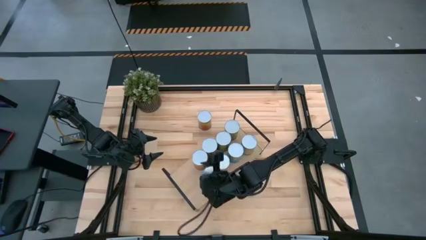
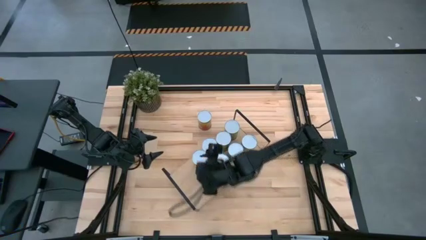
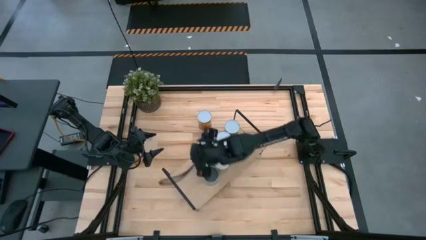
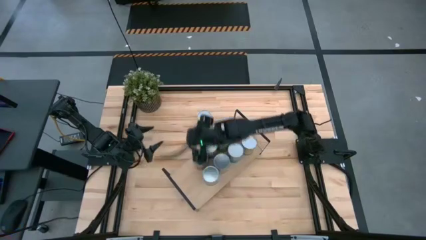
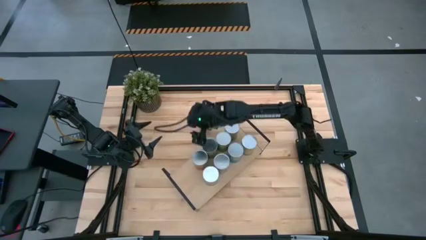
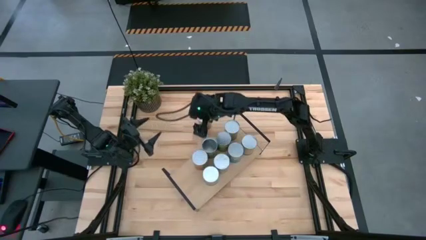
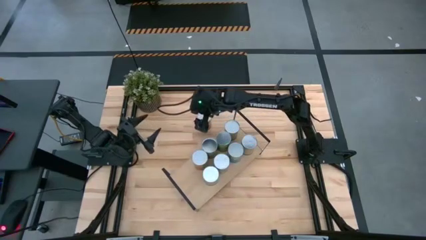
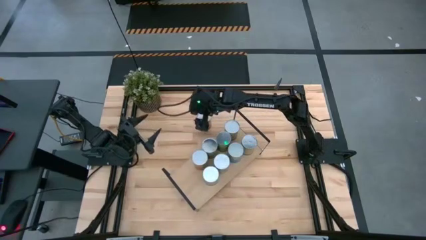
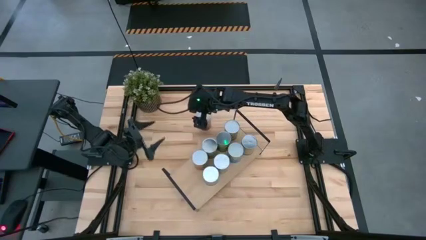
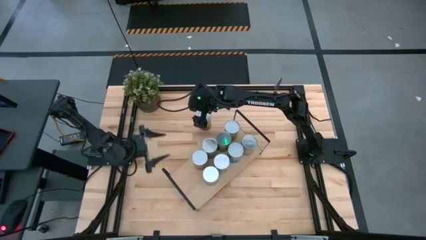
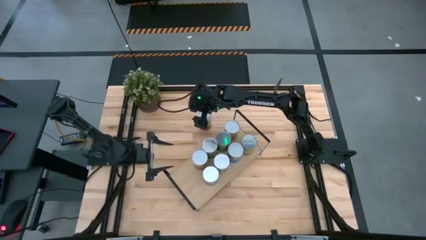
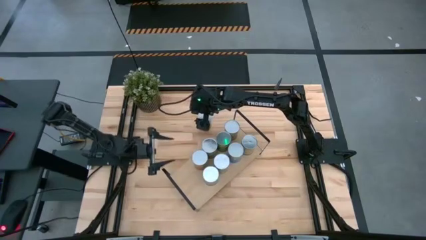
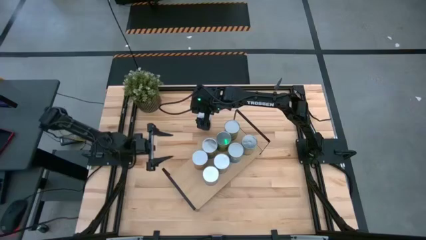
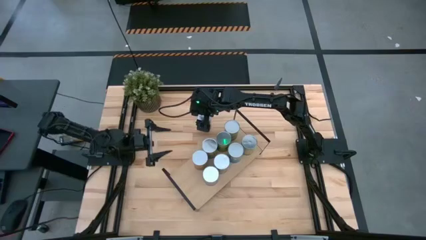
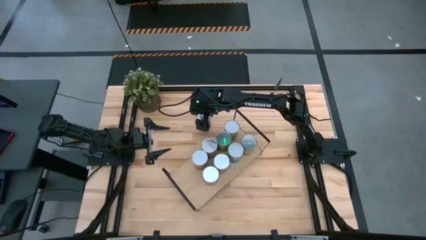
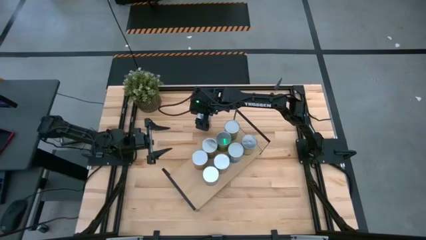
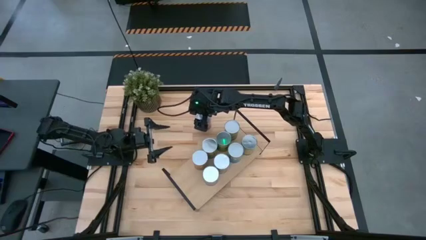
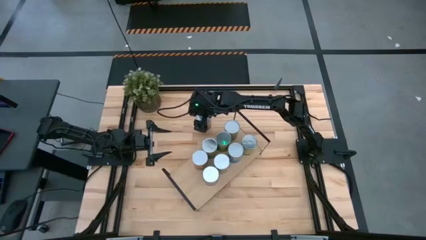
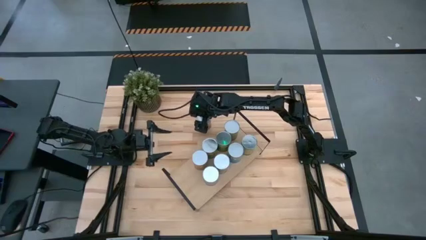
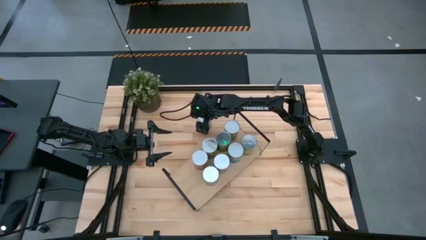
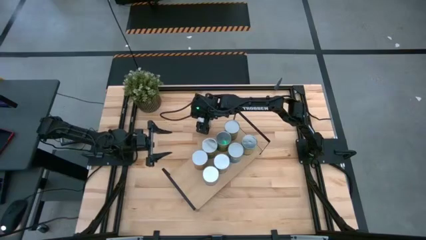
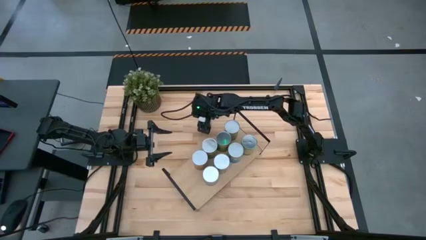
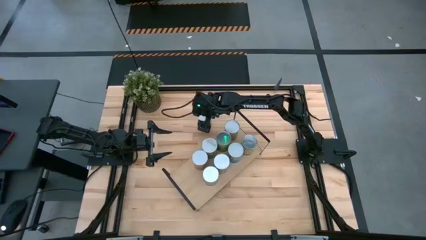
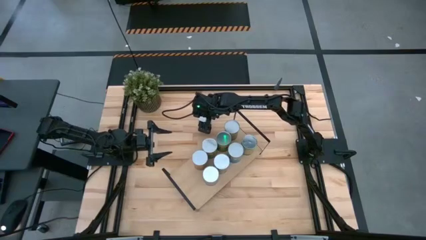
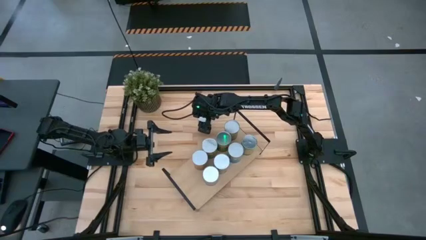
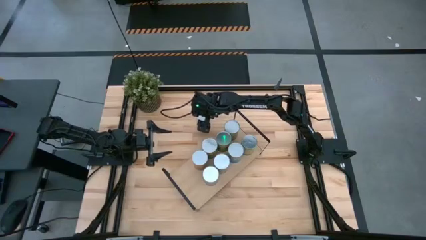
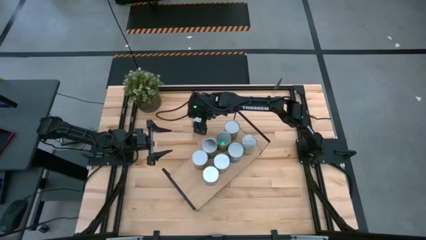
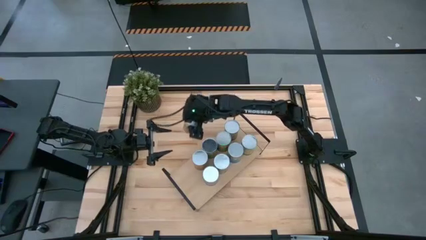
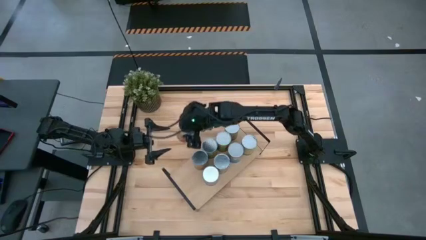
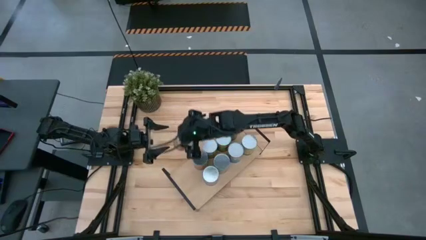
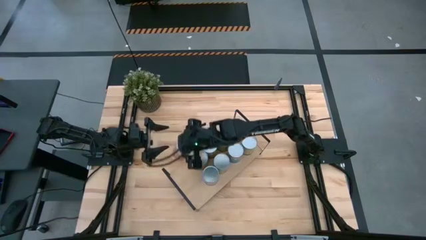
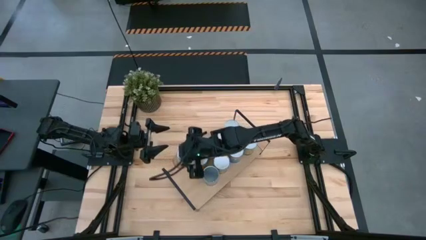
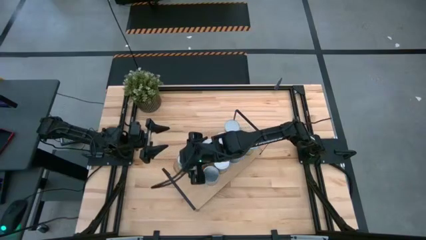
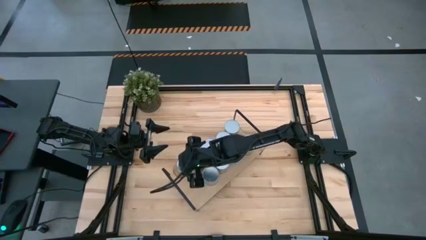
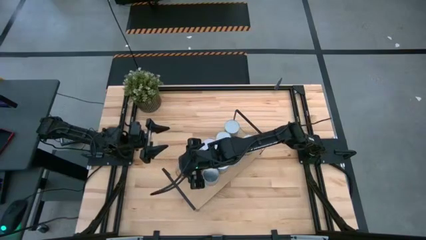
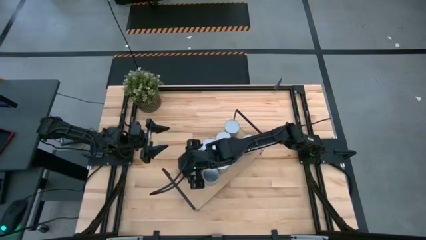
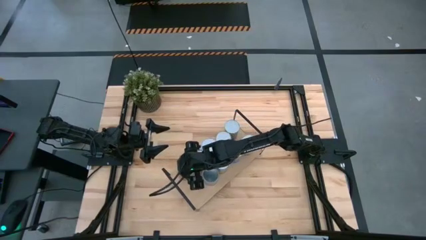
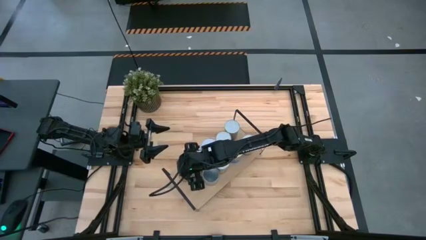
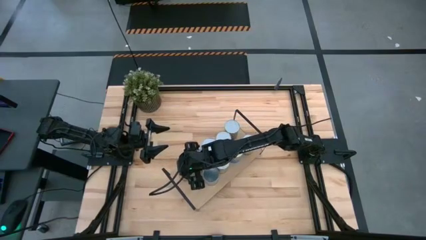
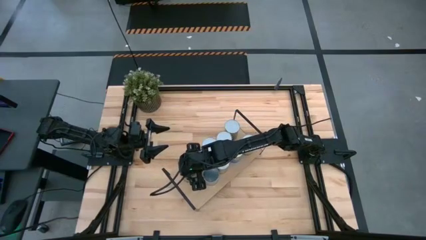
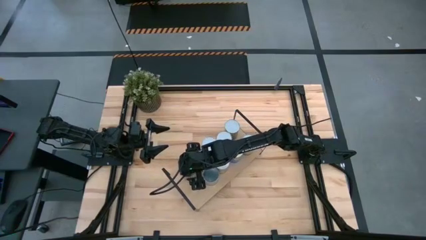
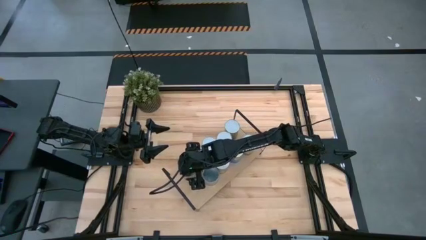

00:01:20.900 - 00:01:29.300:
Task: Pick and place cans onto a shelf
Put the canned pineapple on the shelf

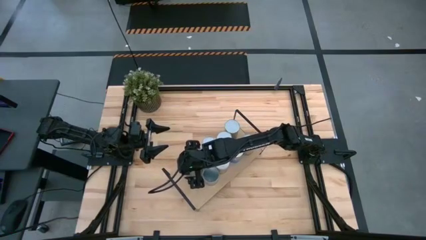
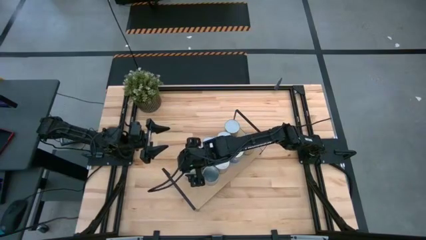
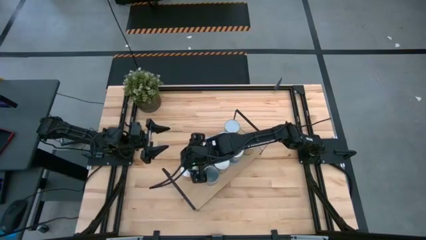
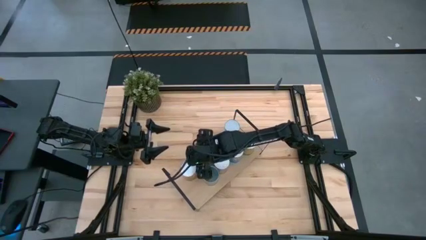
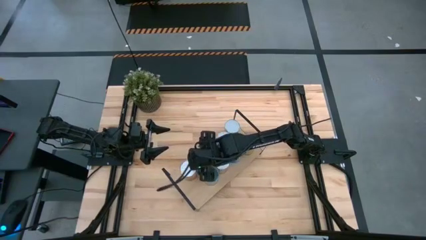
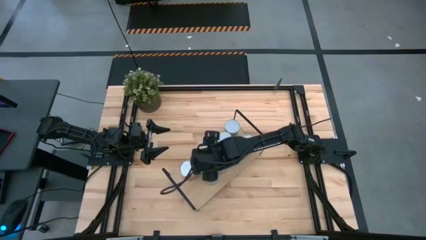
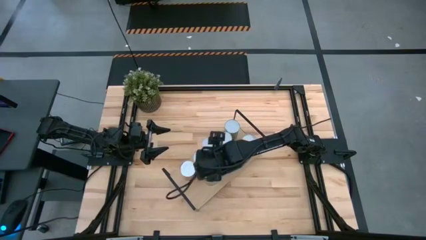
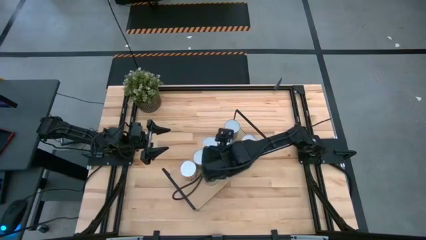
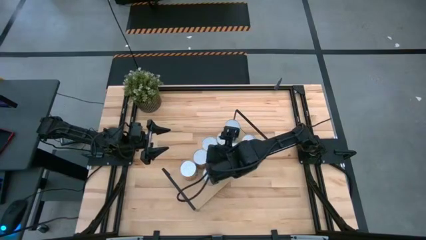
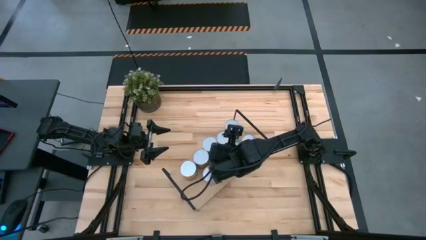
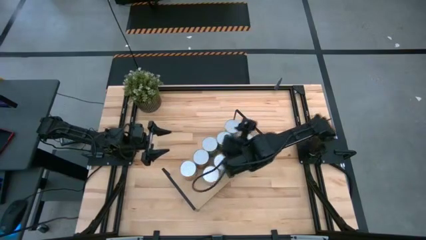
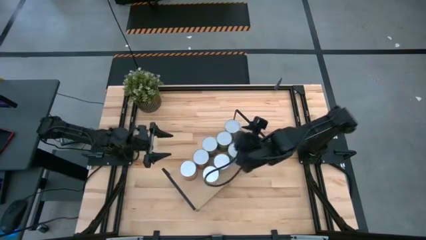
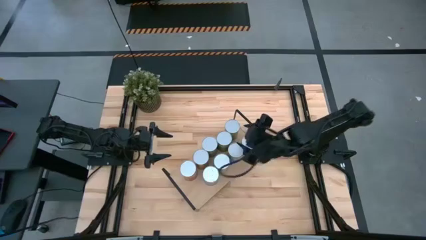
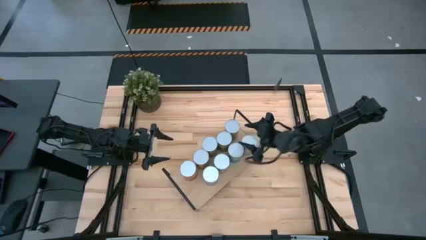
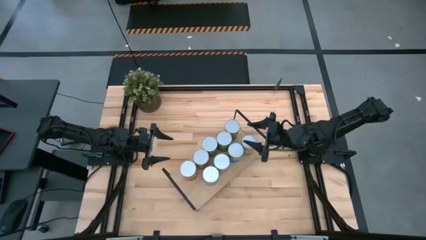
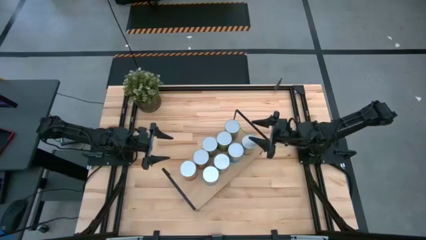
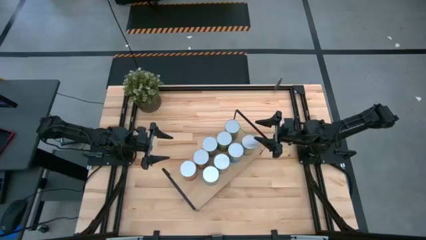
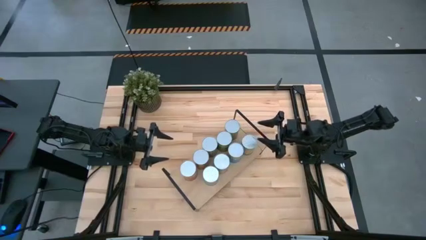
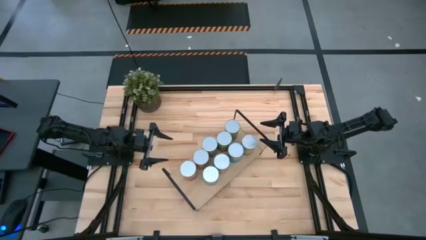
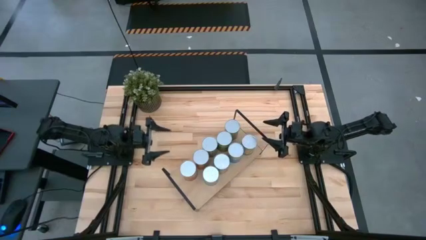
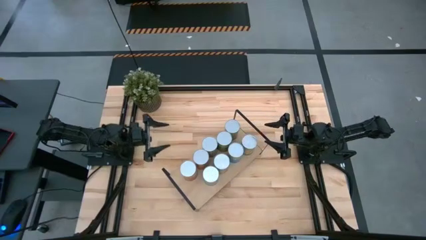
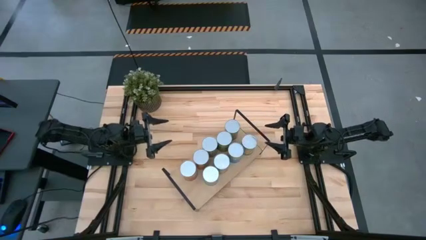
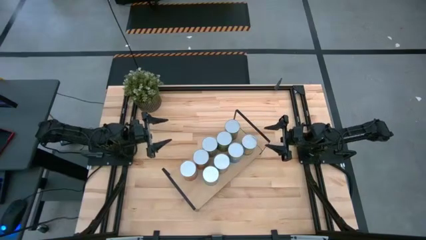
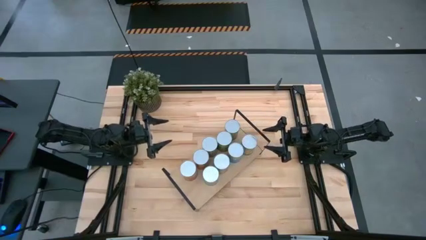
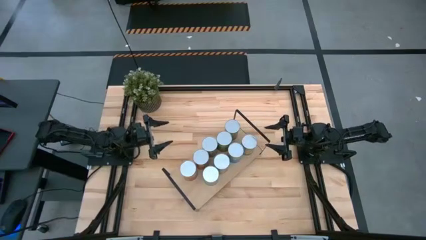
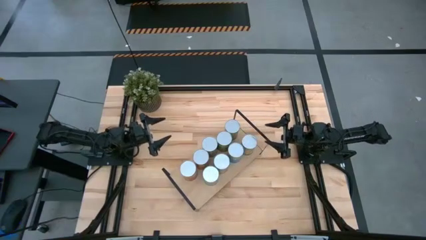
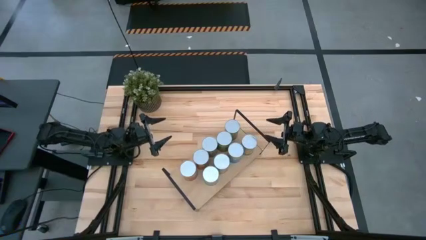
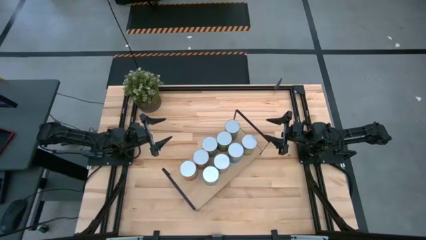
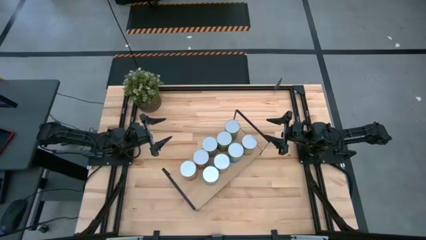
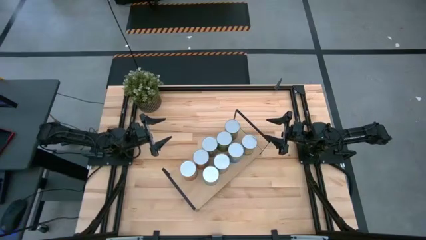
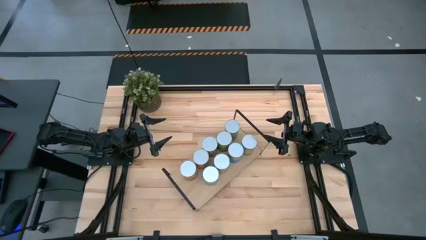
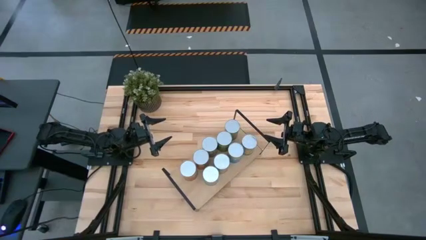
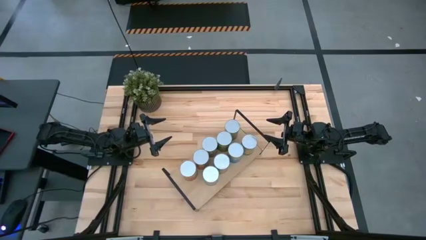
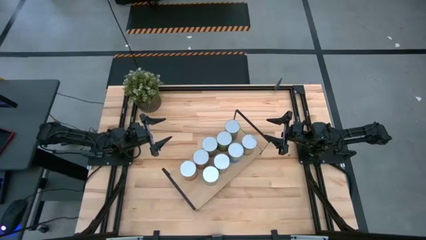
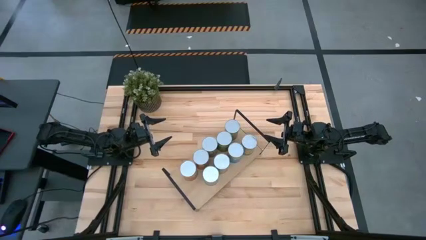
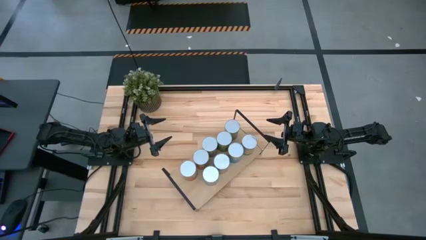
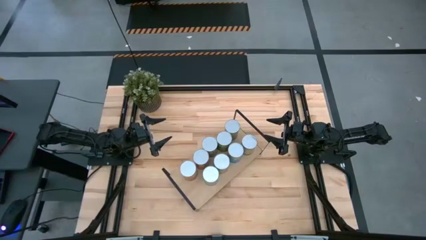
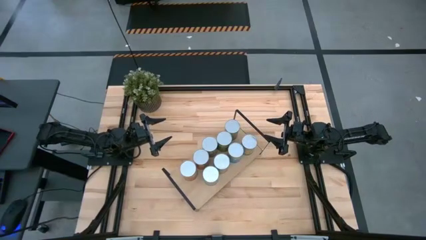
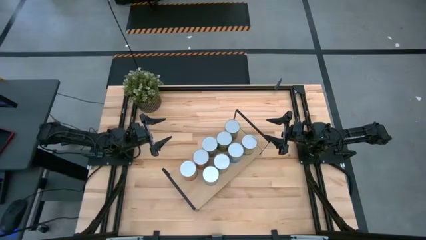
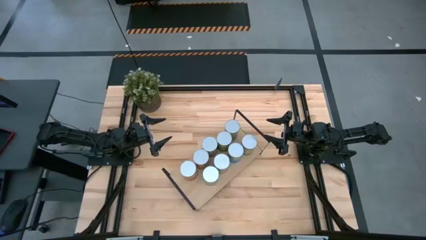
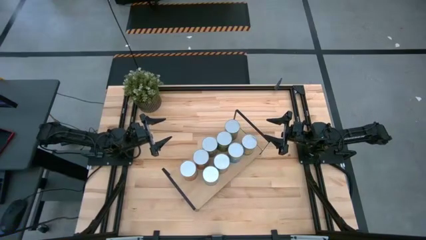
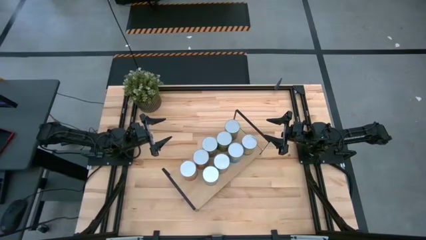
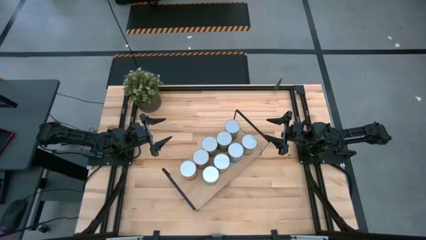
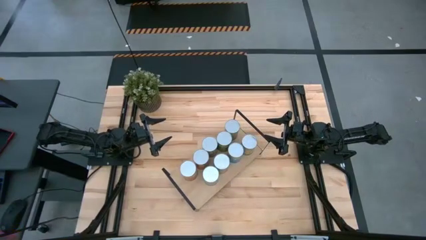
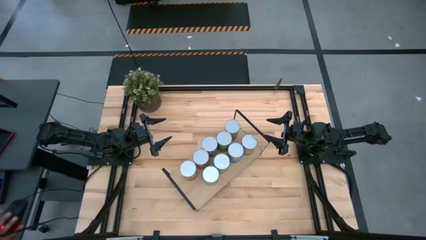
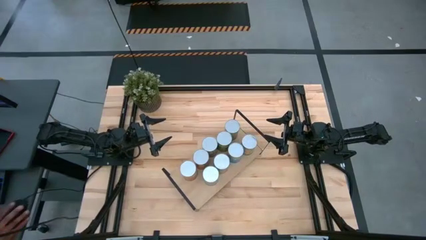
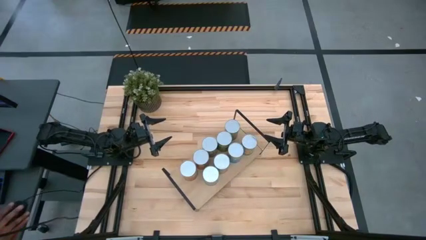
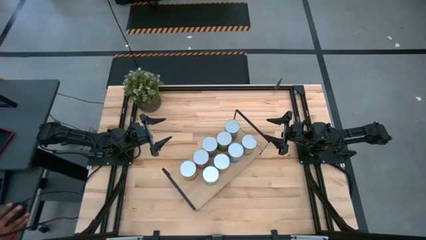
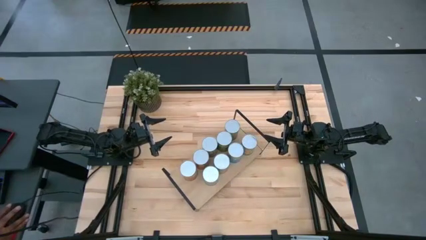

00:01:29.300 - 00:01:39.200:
Return to Home Position
